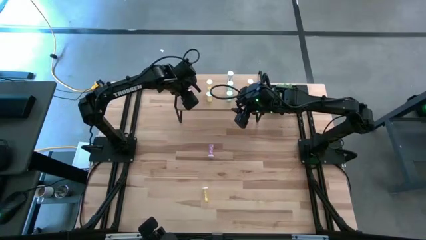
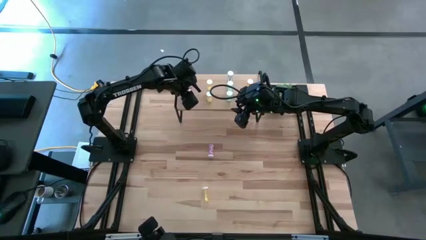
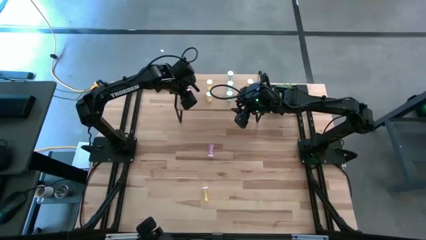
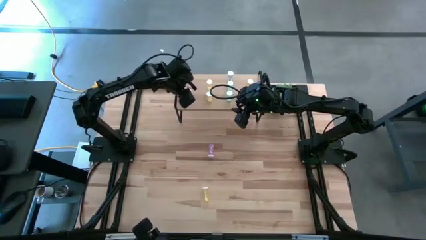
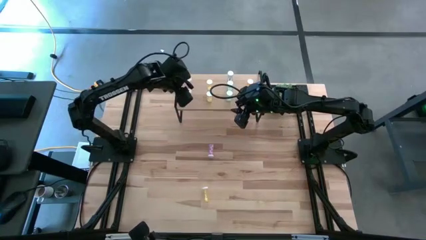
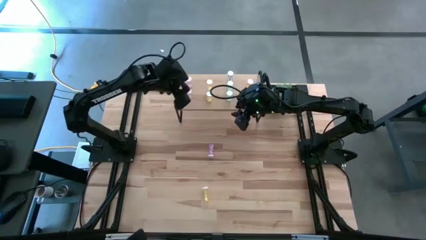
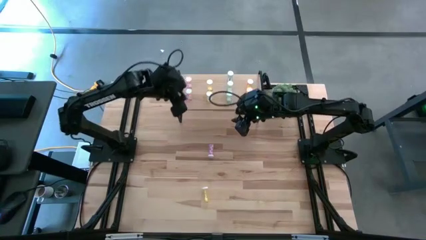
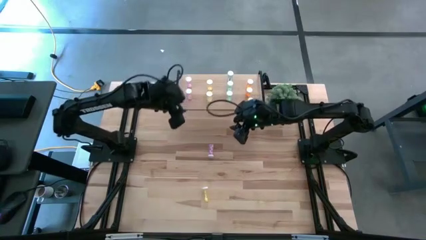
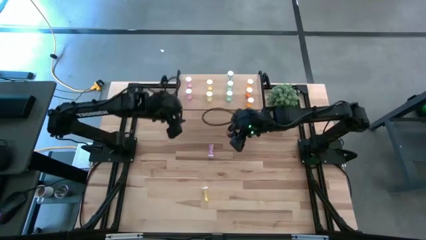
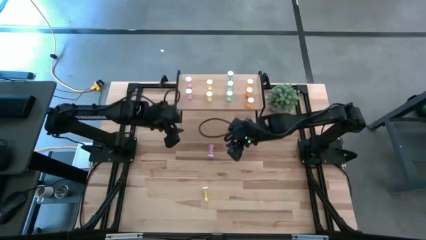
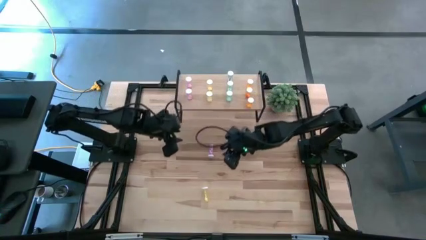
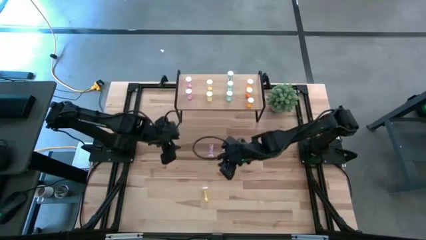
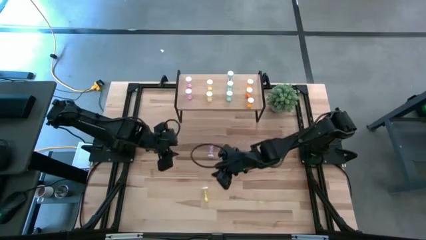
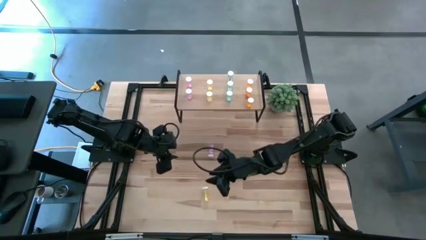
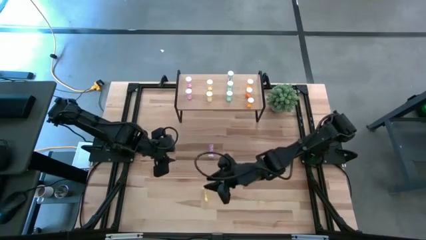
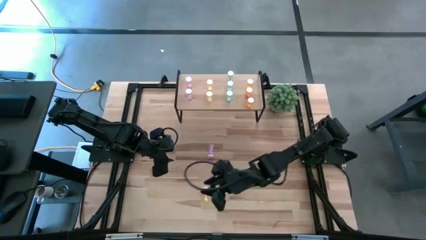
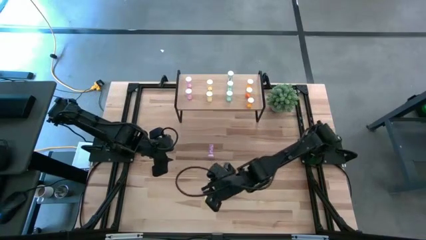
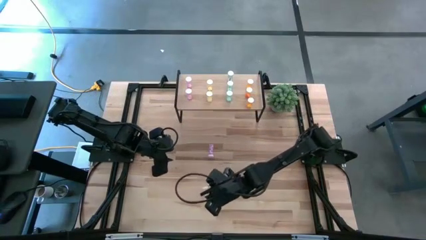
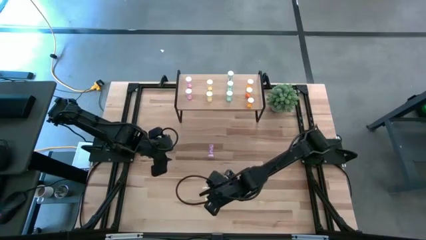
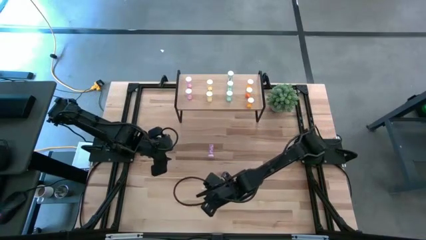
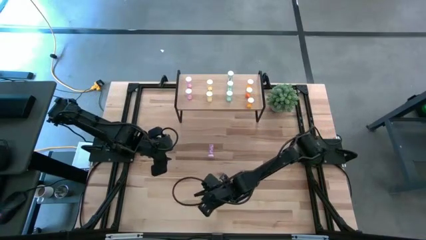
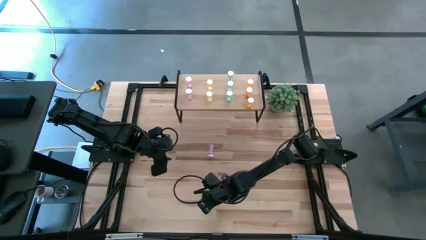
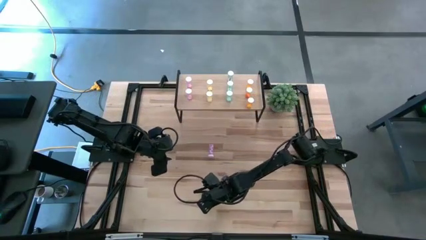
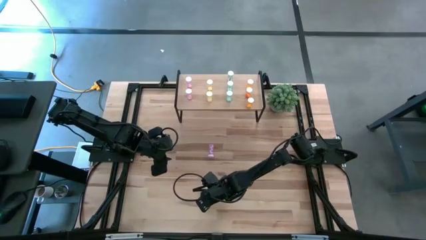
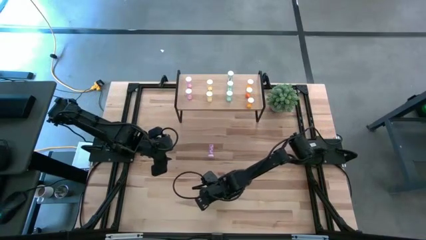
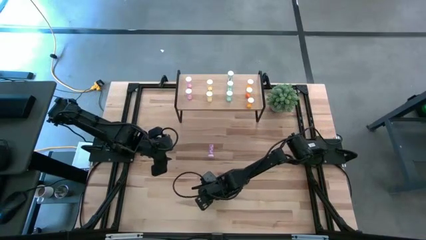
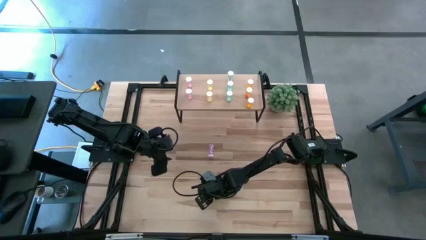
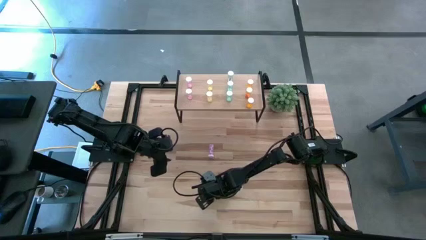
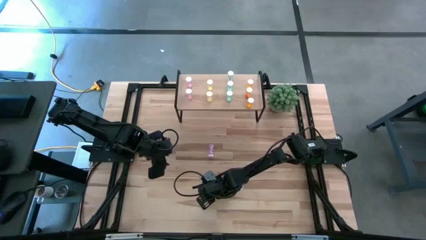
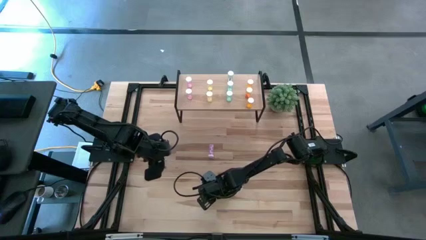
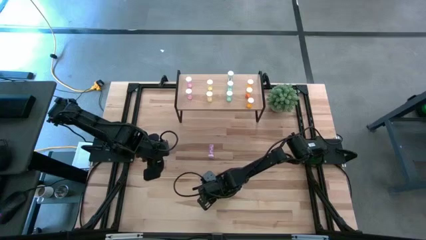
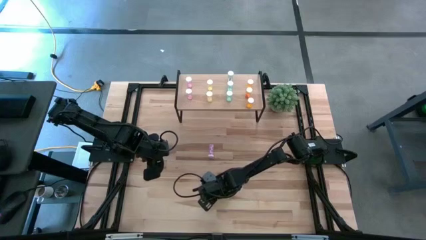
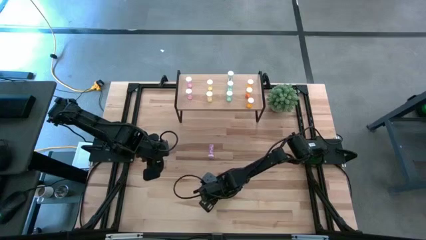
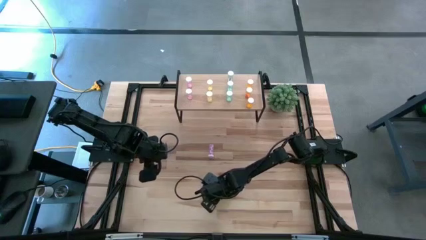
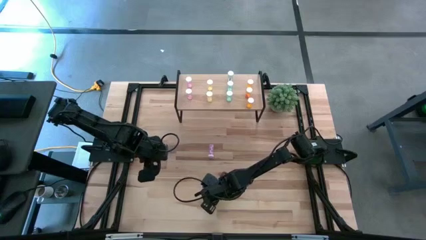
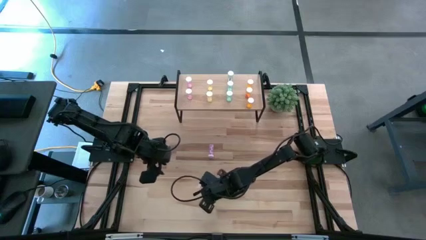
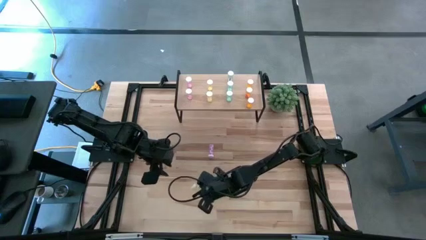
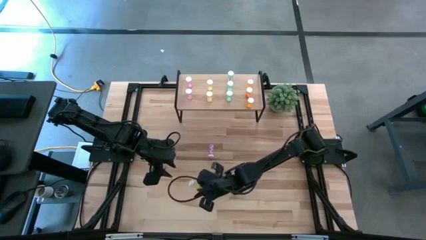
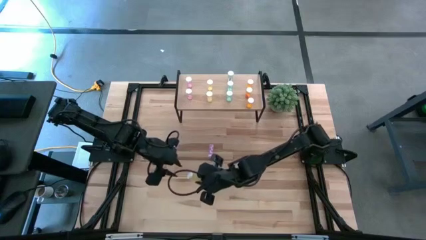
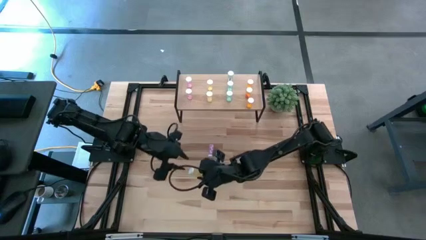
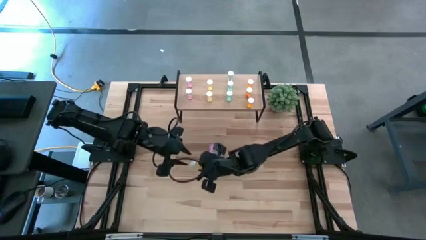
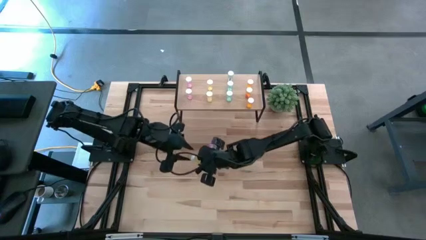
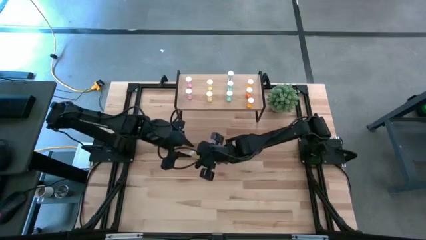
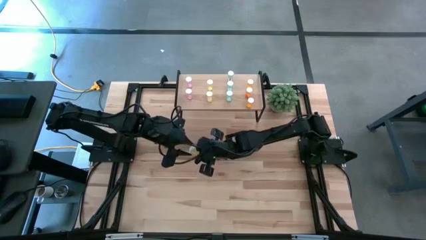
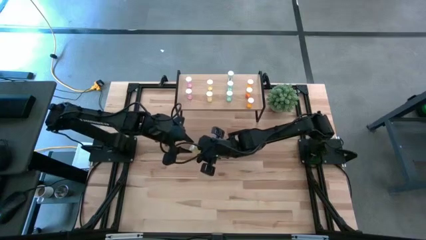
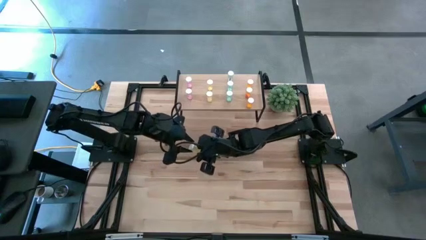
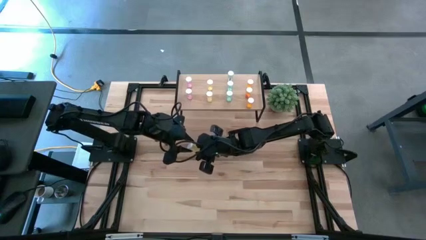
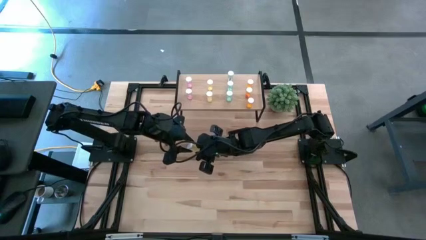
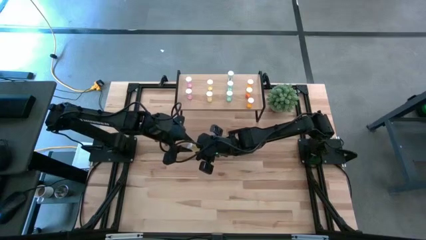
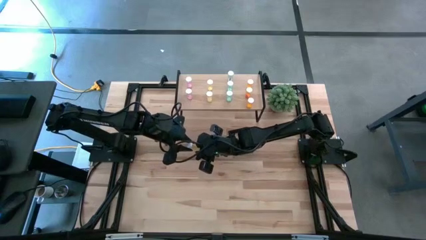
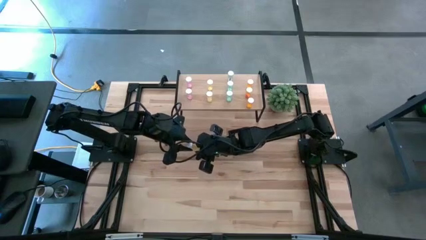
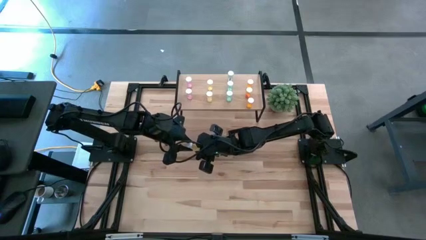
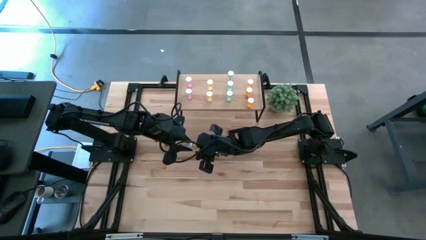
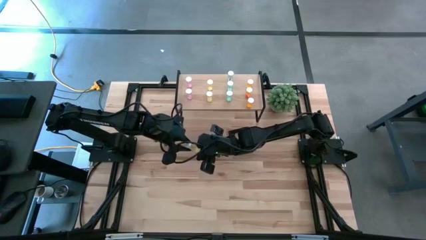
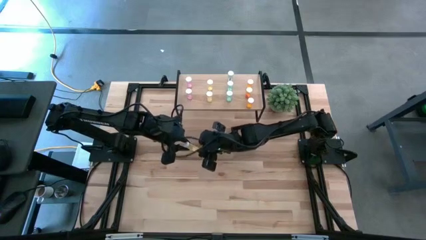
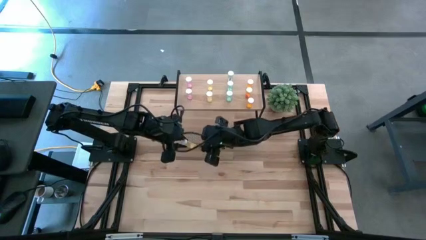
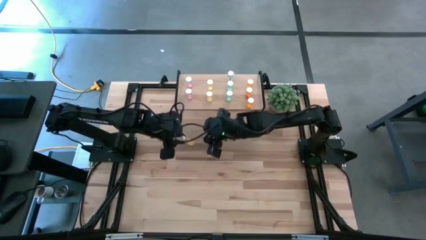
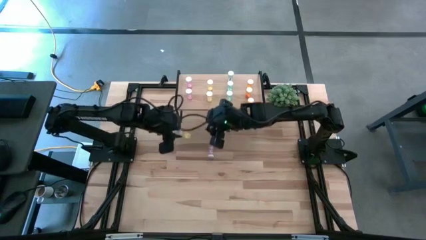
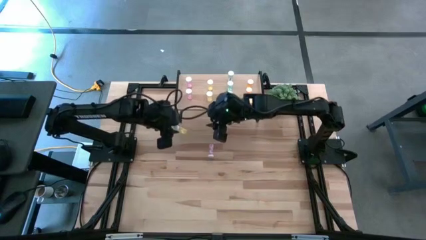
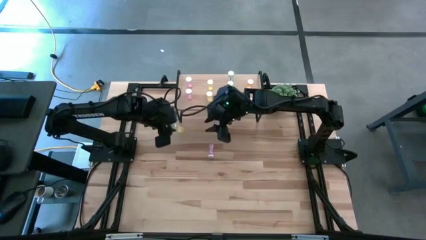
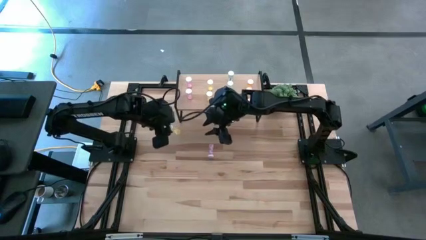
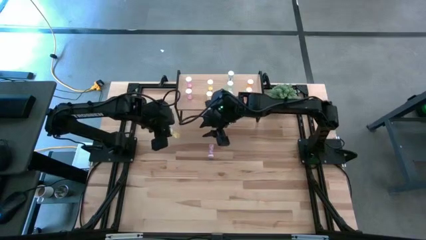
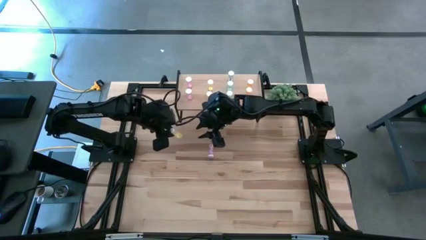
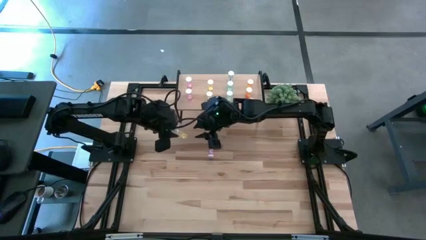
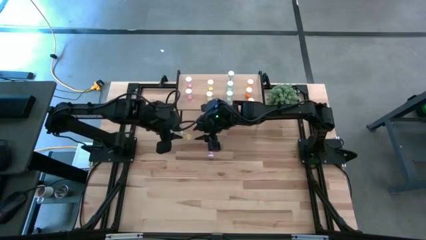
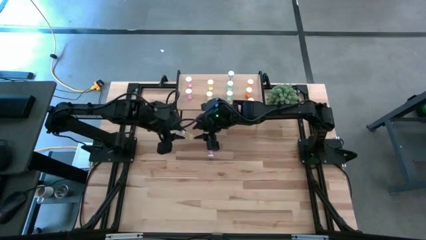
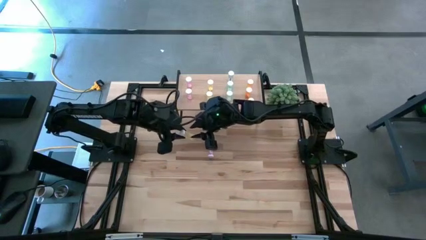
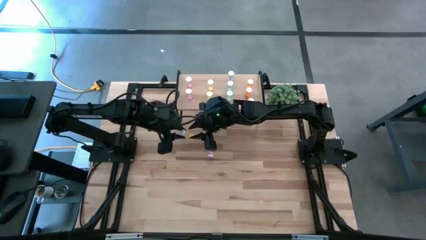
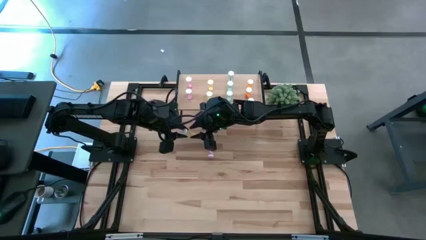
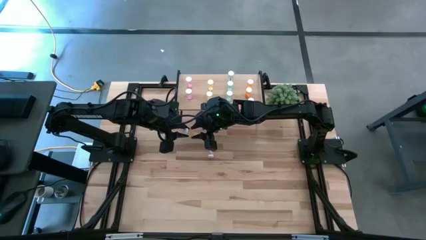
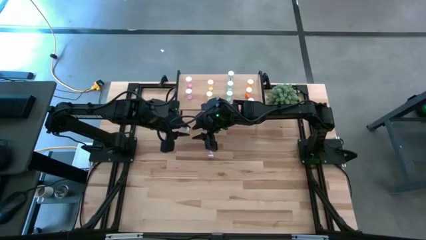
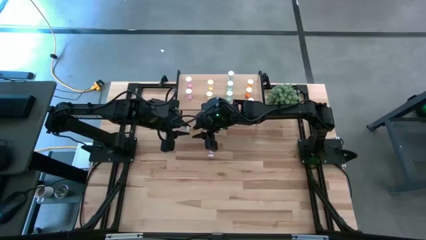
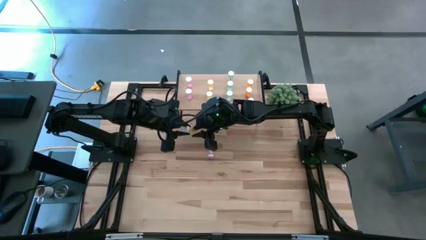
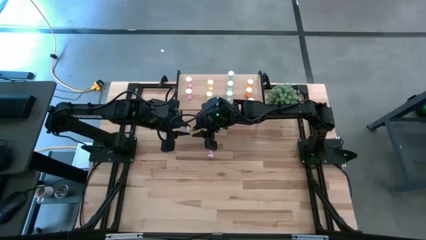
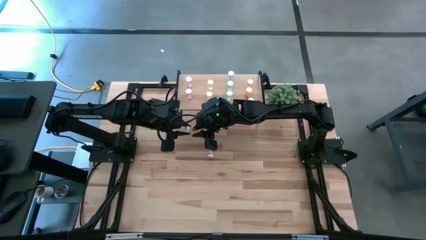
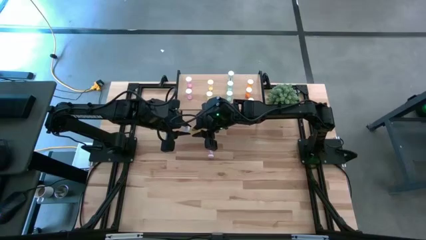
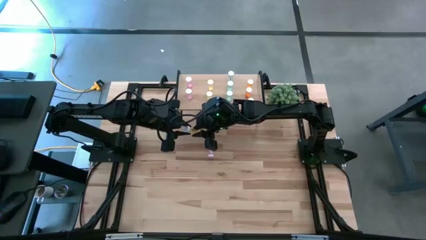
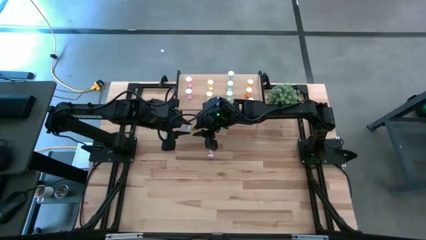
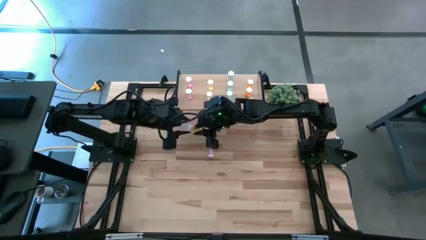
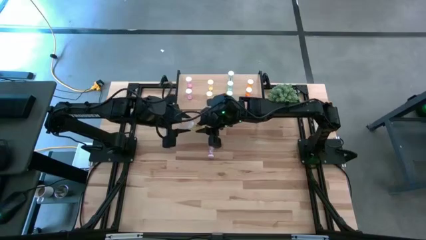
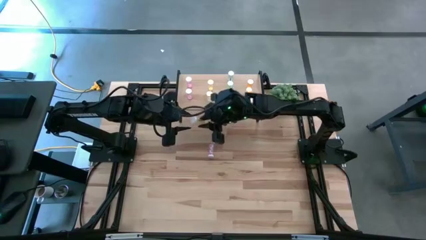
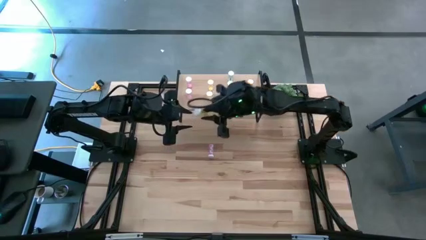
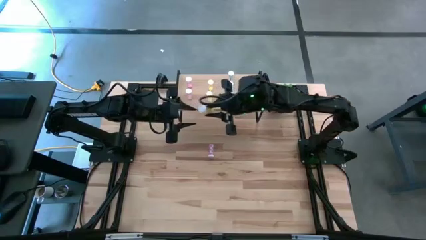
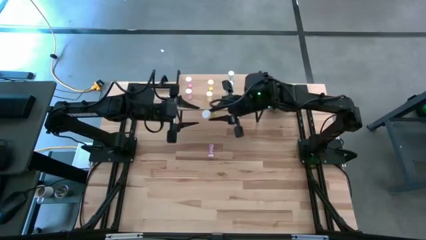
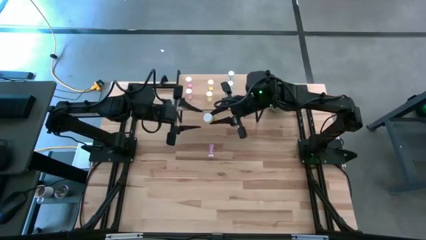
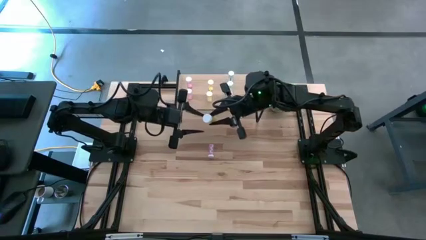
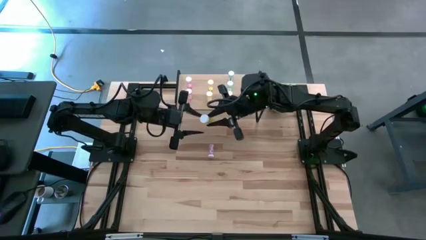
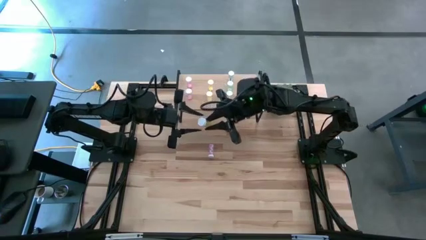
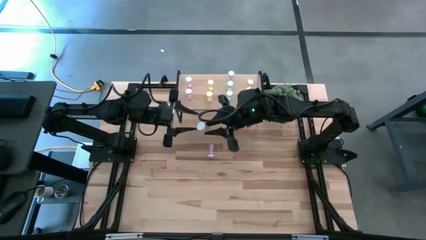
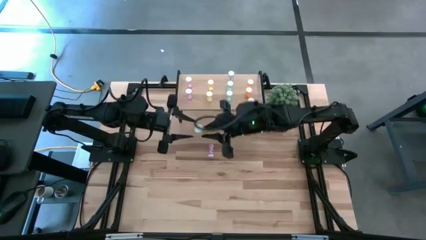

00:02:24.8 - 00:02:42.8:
Task: Pick and place medicine bottles onto shelf by color
Put the yellow pill bottle aligned with the other yellow pill bottles on the shelf
